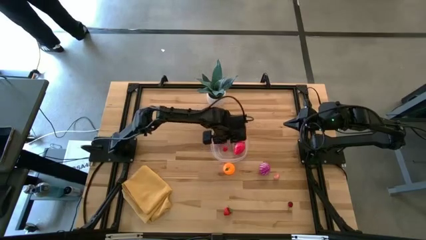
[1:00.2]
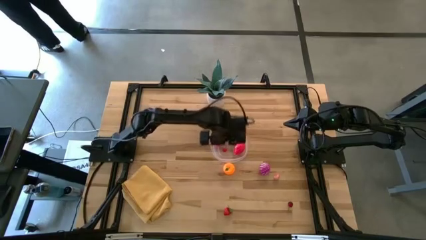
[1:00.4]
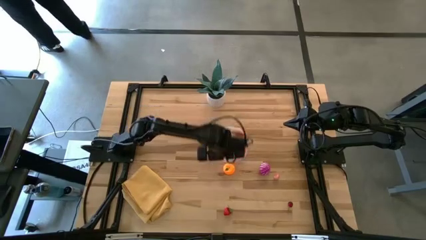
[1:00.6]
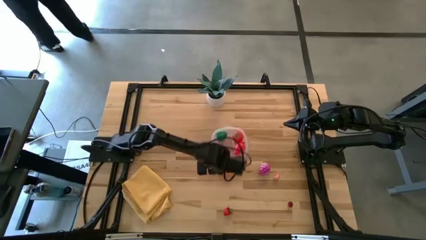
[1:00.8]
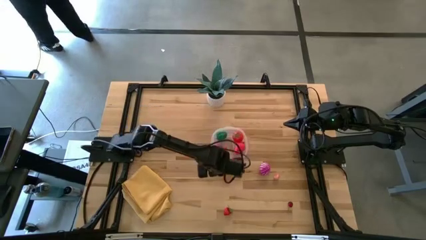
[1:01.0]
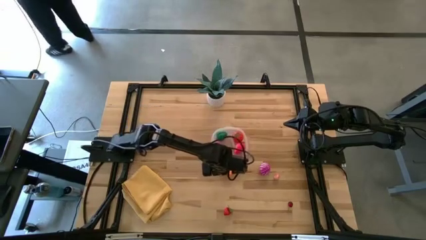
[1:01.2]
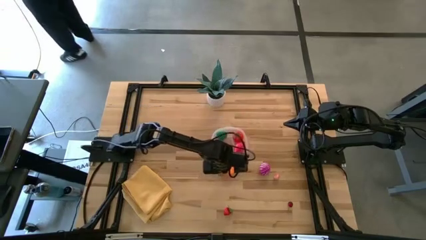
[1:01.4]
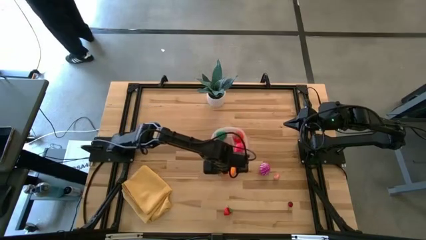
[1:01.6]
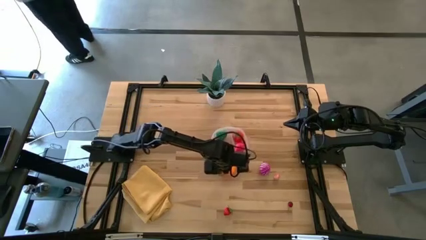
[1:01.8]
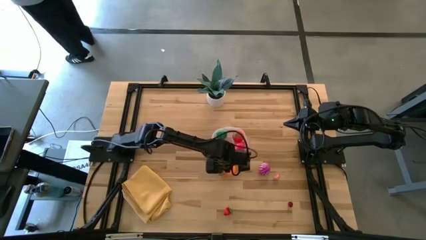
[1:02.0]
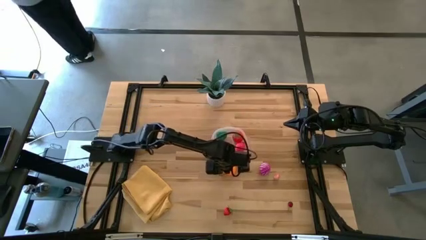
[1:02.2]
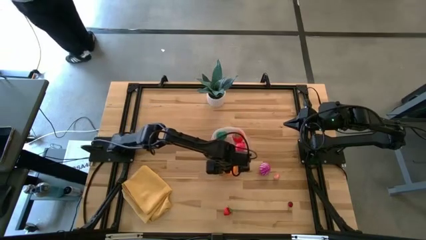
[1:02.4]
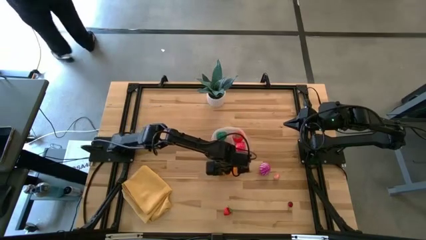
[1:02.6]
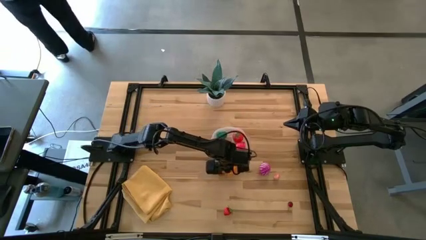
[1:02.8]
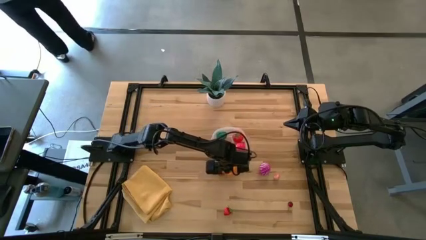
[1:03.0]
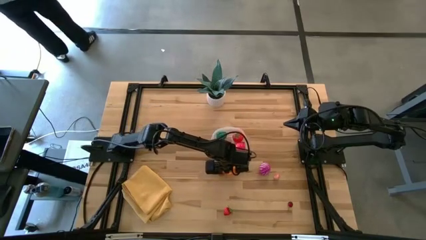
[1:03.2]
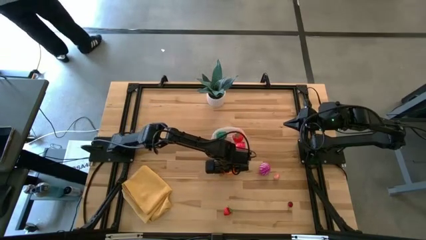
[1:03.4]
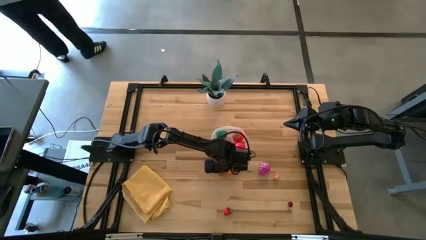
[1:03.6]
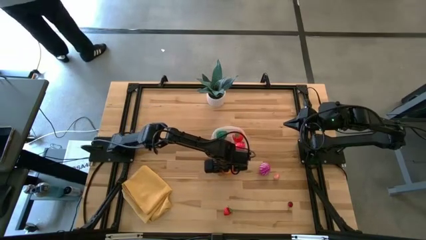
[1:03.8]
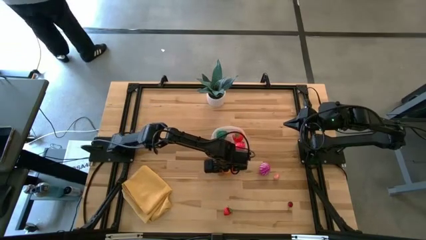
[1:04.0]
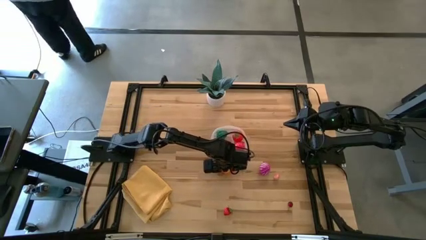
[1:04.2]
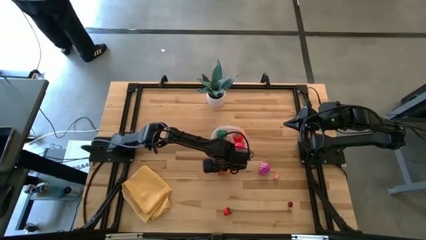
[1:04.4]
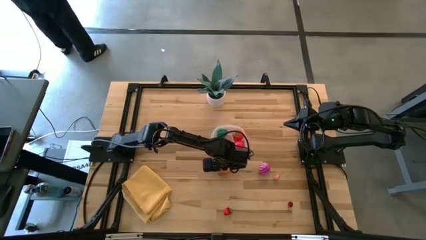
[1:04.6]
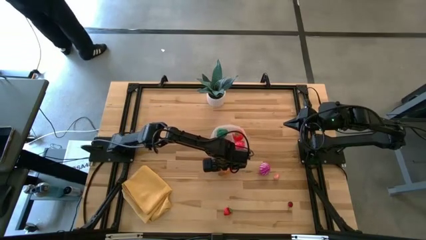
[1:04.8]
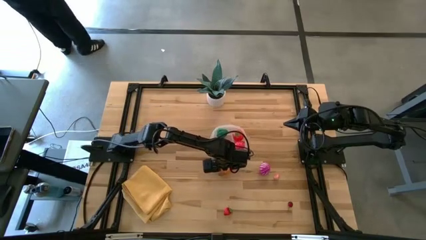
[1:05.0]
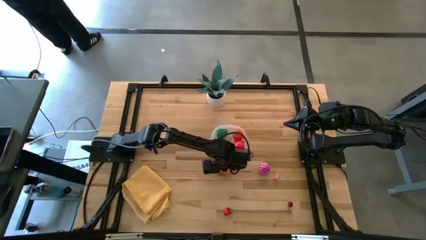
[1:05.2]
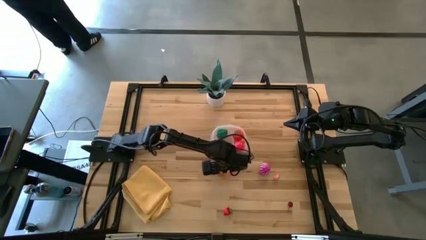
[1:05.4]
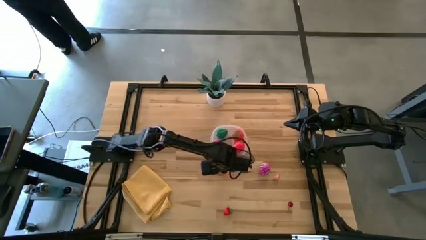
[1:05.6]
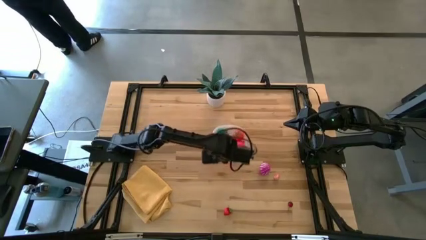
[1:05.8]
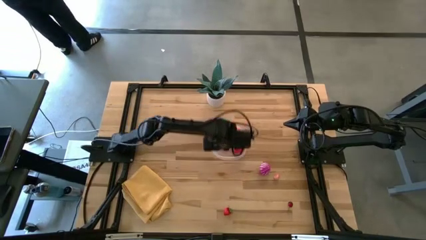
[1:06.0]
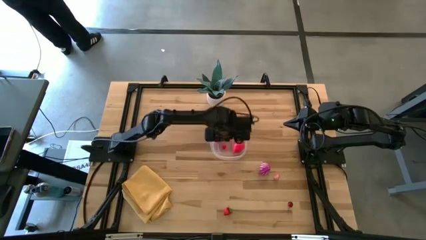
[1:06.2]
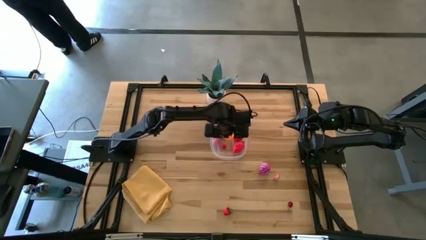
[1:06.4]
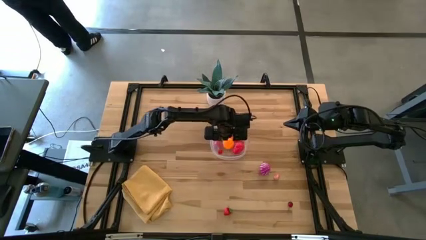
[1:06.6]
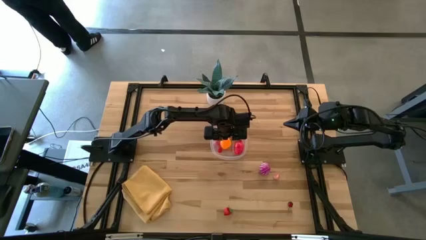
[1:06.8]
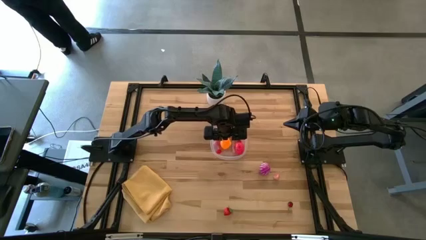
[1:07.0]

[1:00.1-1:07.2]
Task: Pick and placing Produce into tupperware
Put the orange into the transparent bin

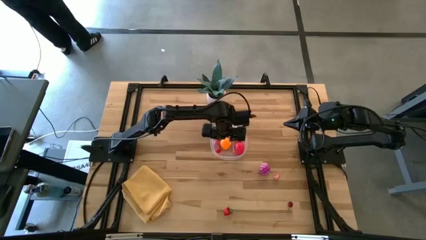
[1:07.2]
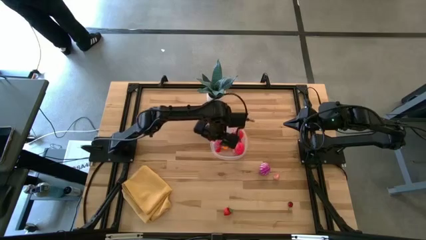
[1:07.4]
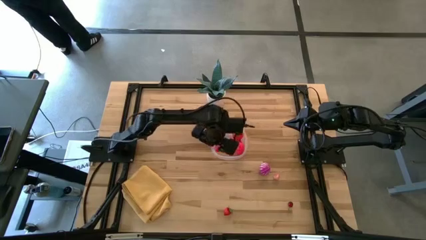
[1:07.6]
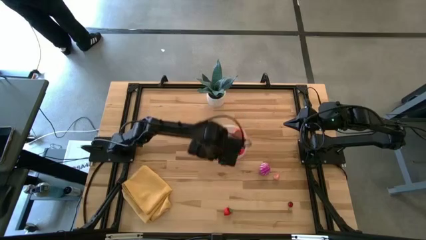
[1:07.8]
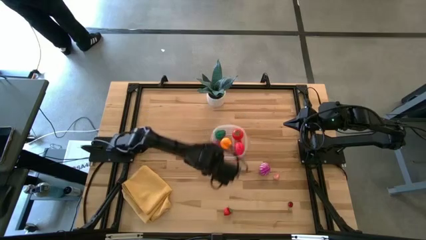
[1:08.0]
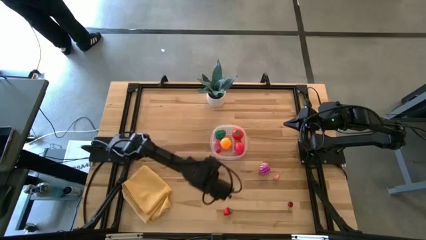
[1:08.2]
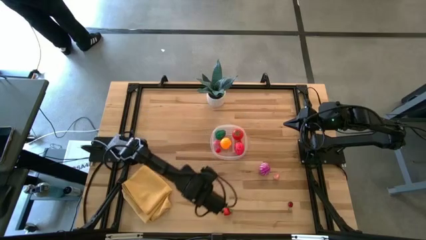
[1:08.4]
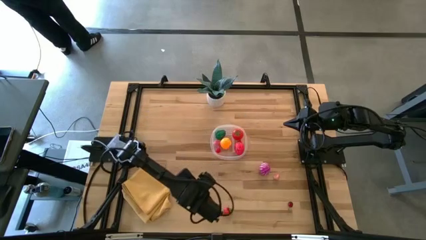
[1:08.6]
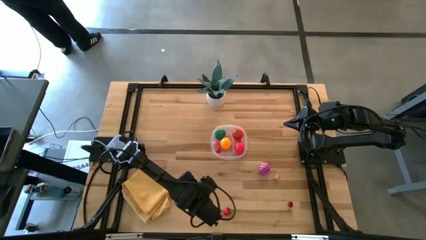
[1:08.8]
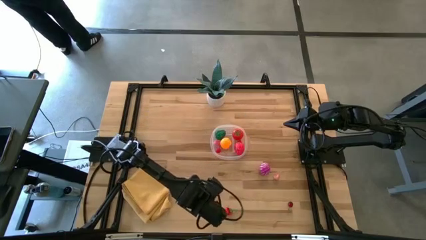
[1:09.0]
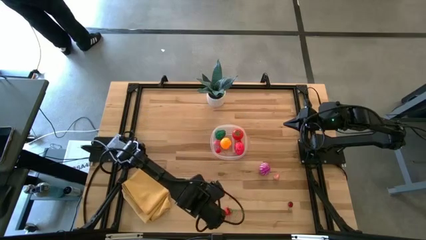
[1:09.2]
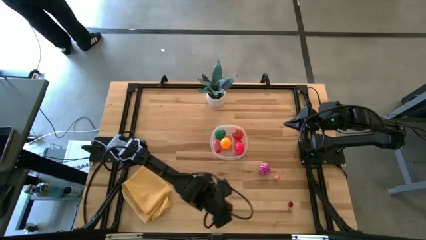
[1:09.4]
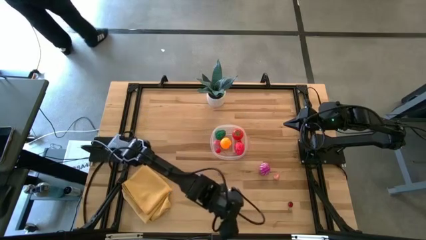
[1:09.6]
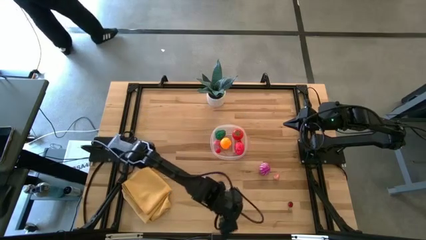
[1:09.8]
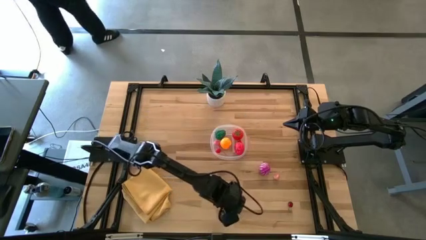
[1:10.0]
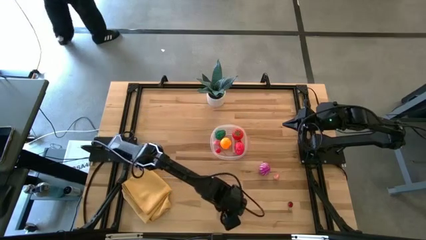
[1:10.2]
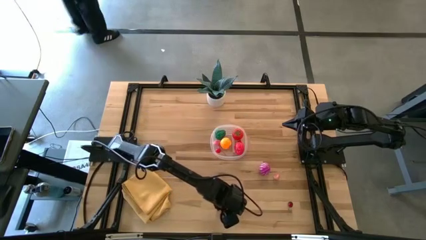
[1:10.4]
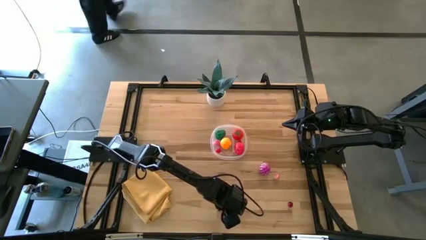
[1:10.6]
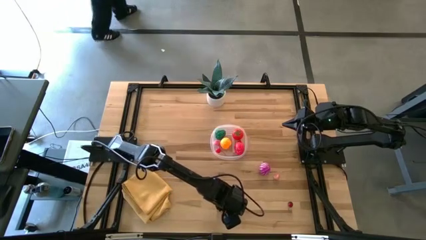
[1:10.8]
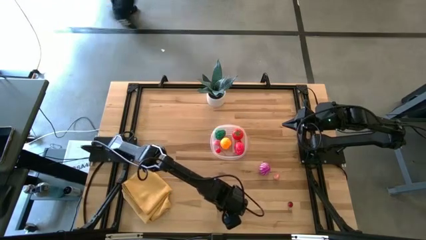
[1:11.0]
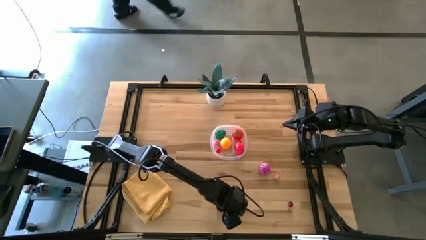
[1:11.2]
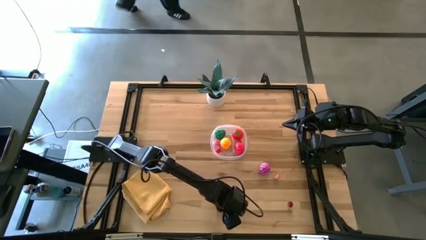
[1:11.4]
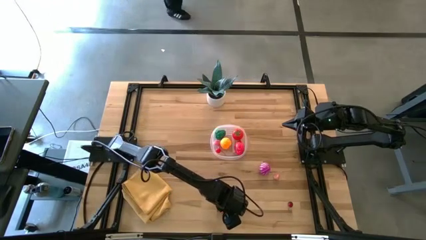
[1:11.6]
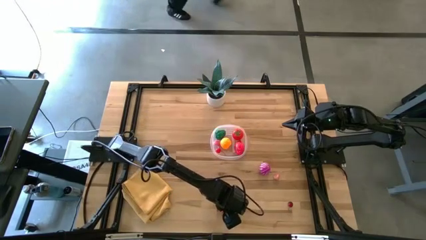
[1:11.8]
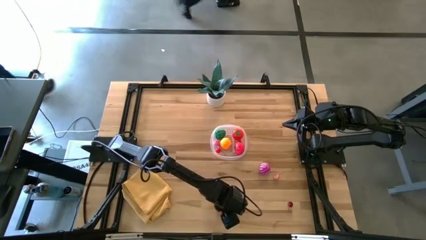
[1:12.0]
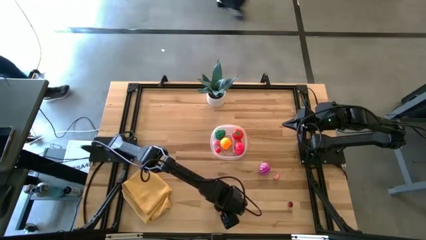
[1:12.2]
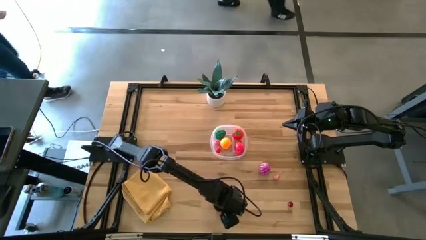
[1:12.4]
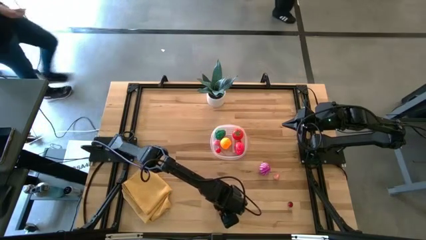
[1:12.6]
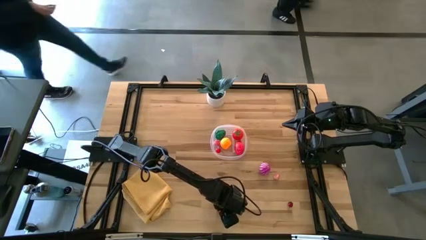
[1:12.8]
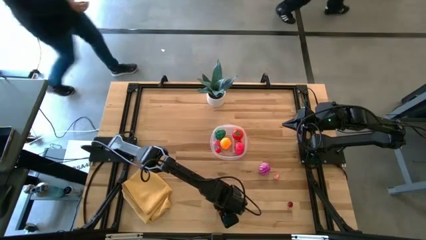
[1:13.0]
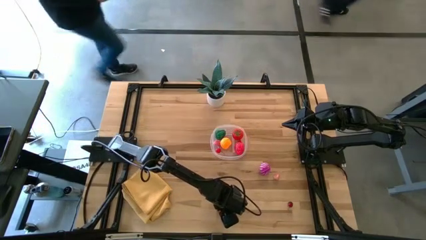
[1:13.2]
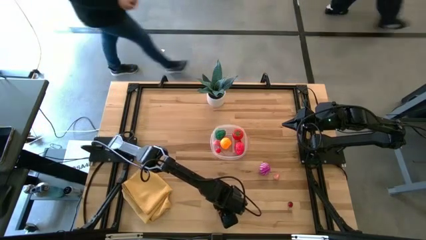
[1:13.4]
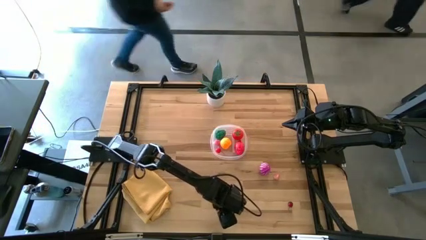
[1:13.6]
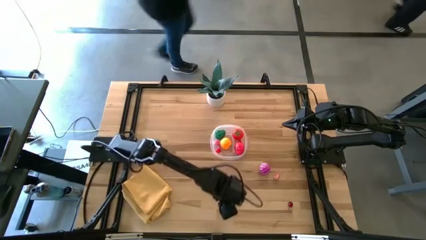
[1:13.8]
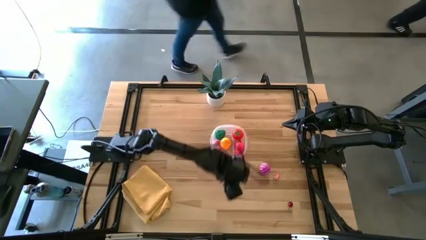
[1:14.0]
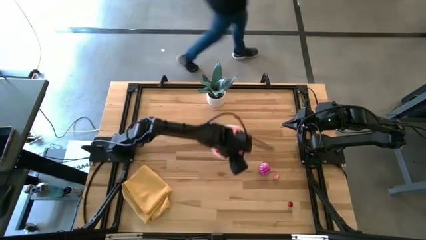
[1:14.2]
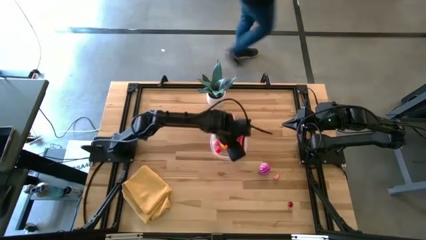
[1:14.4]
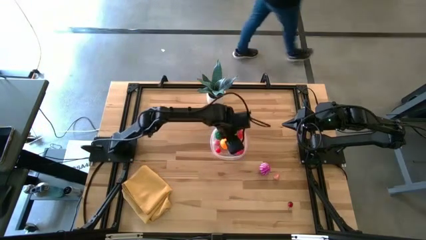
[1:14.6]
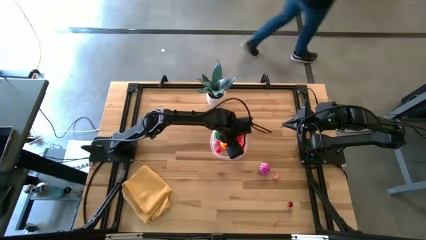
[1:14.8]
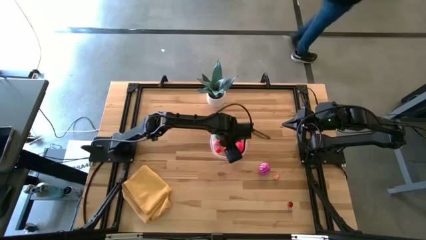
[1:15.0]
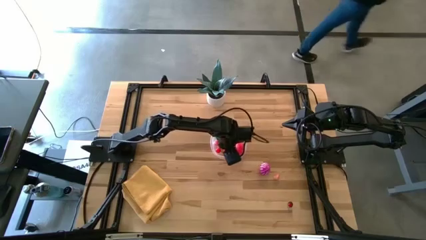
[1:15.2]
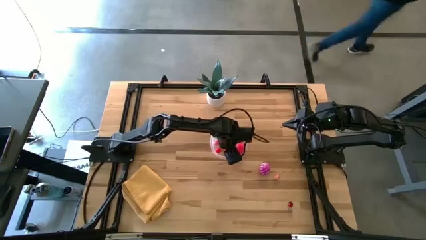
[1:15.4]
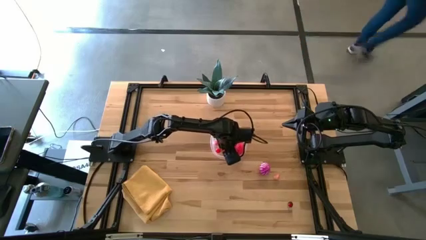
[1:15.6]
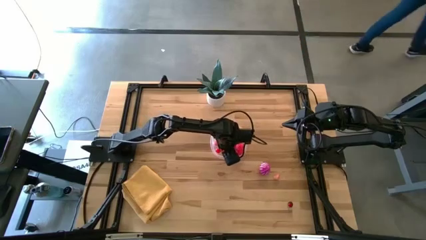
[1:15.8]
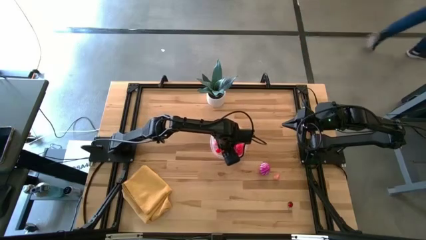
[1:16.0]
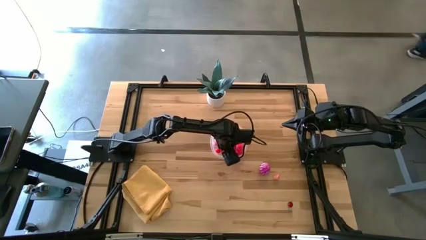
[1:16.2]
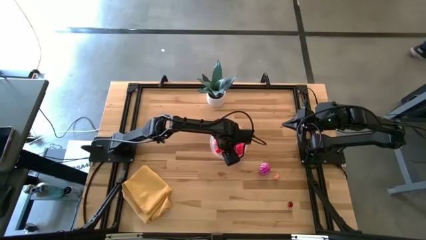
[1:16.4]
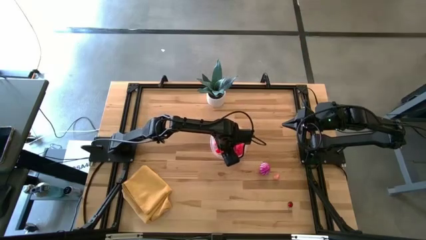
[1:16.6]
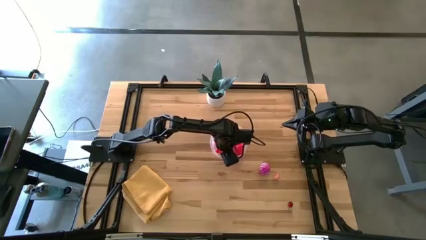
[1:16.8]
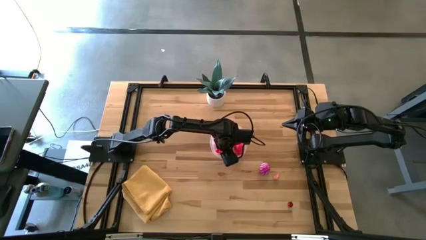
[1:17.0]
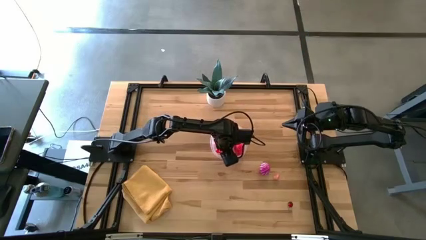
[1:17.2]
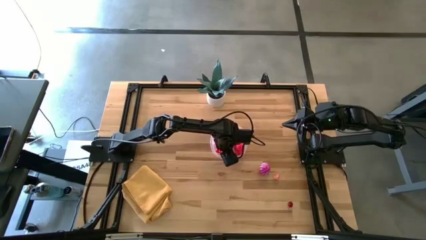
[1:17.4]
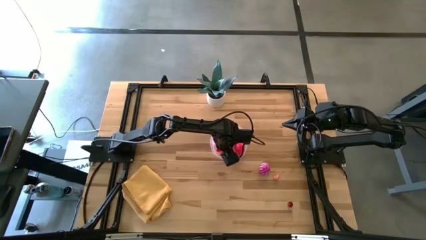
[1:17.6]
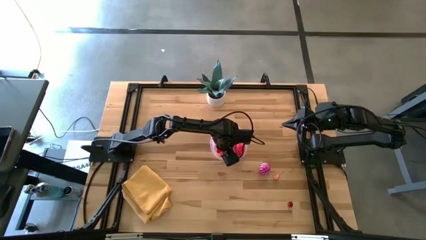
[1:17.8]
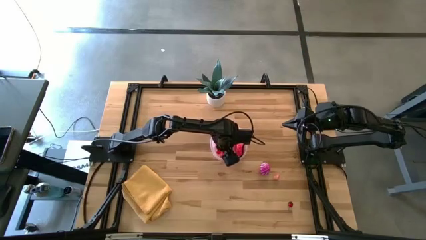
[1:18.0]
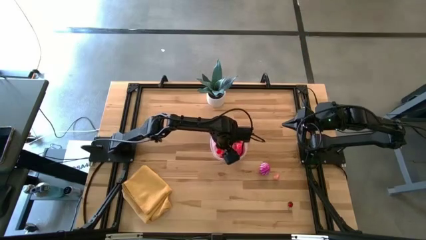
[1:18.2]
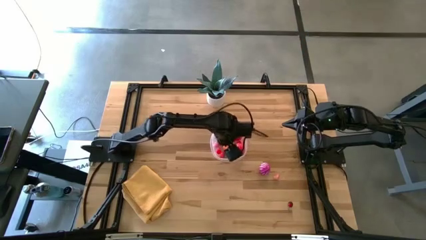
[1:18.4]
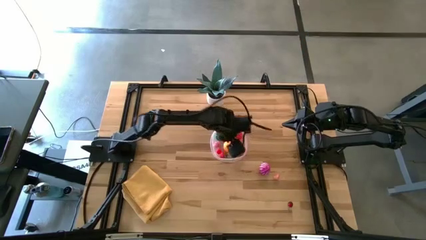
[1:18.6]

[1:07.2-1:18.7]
Put the strawberry into the transparent bin
